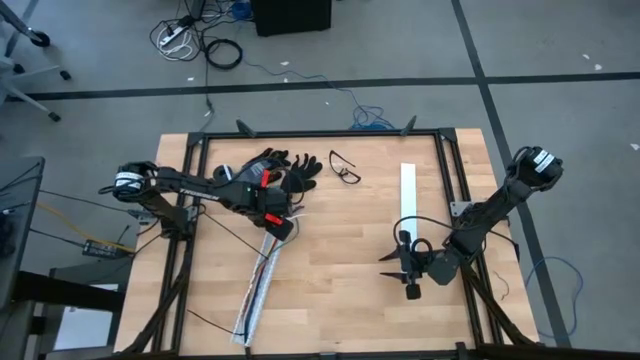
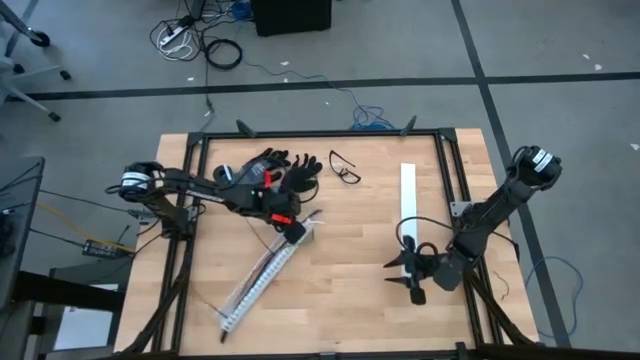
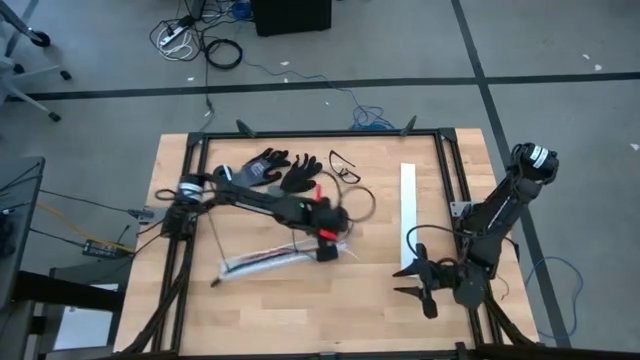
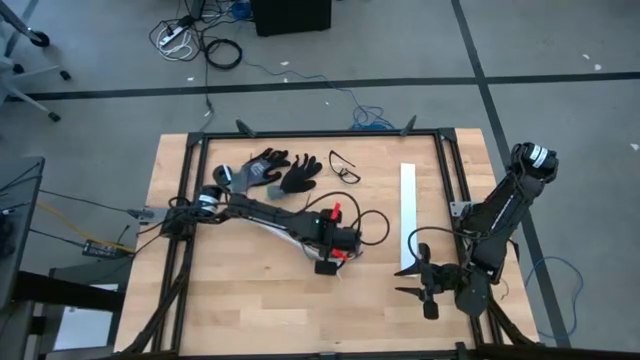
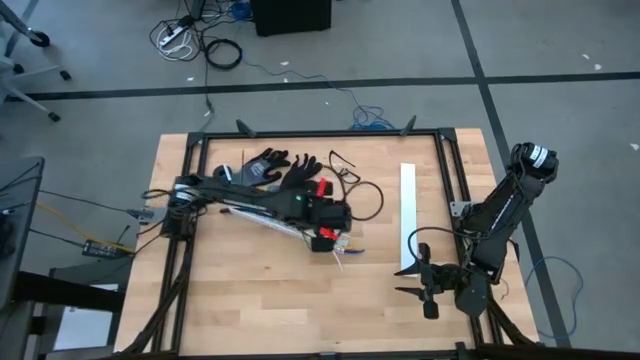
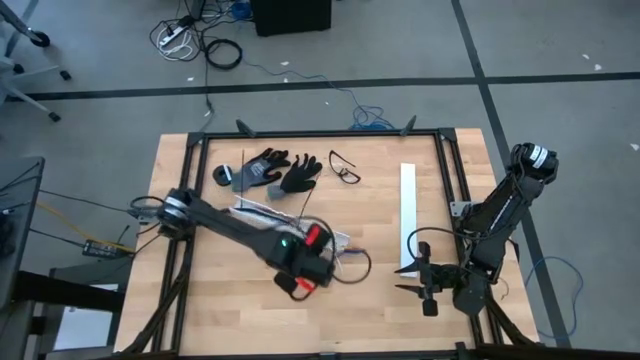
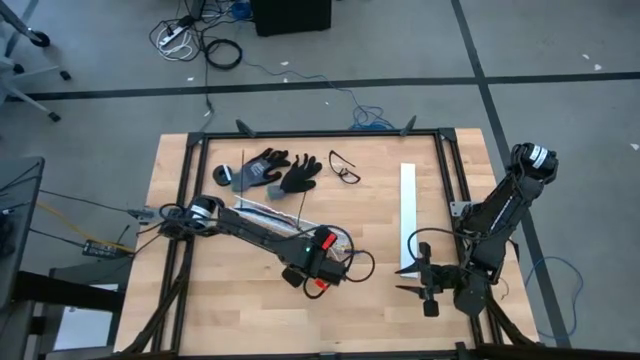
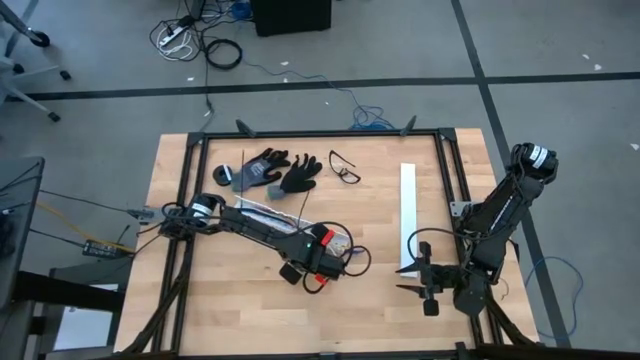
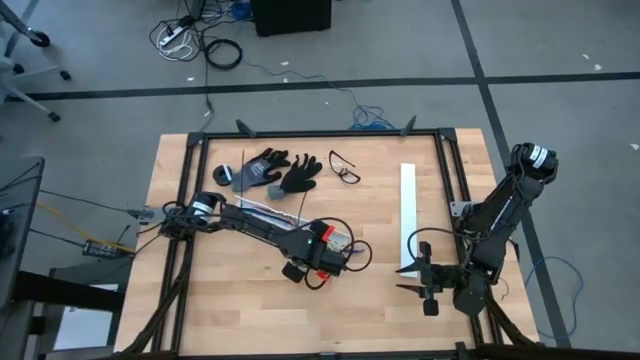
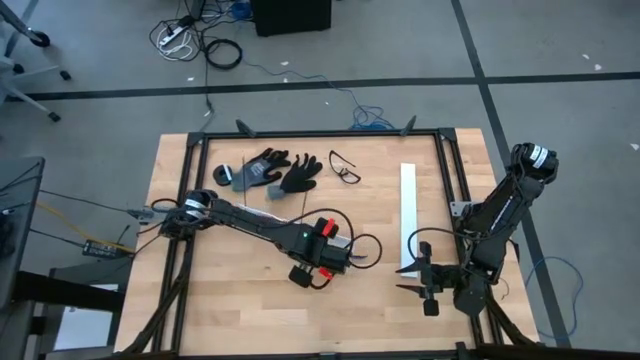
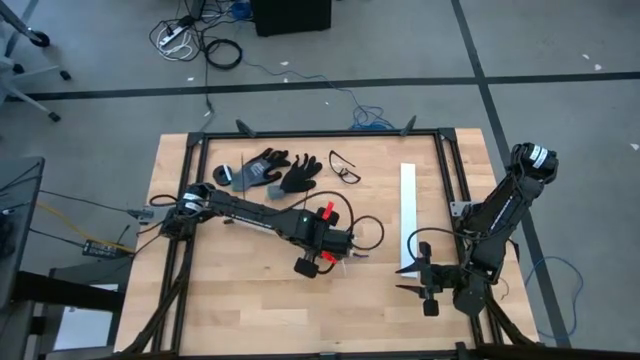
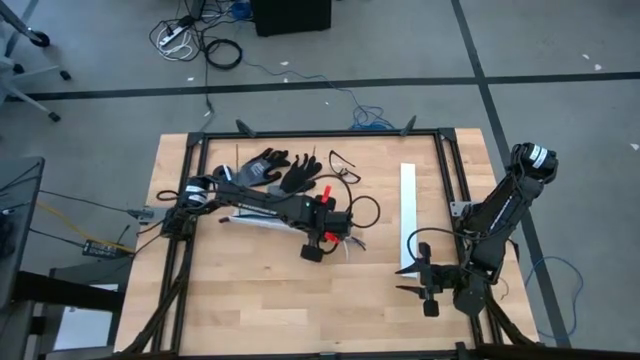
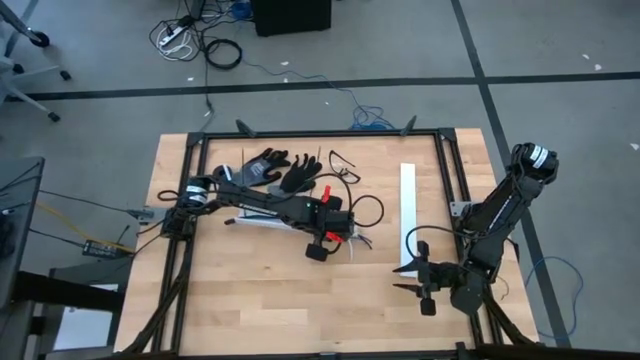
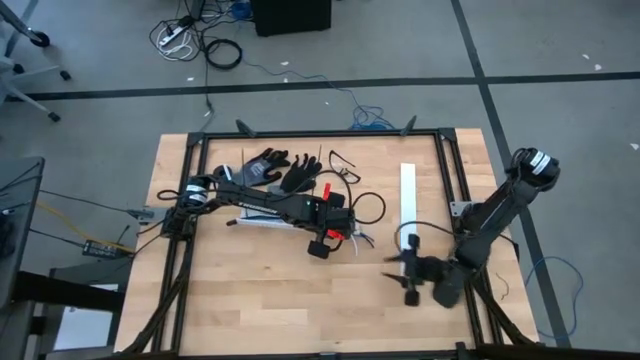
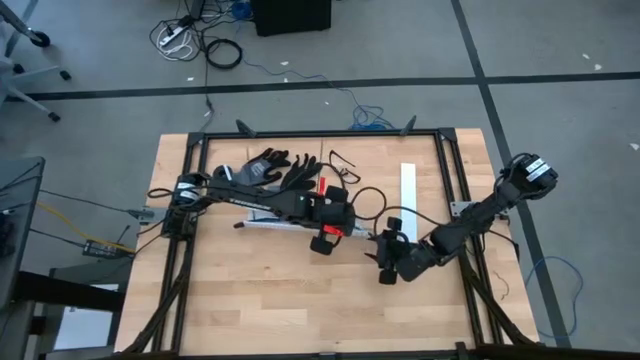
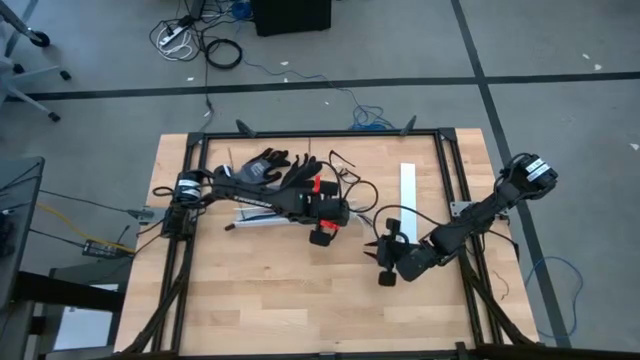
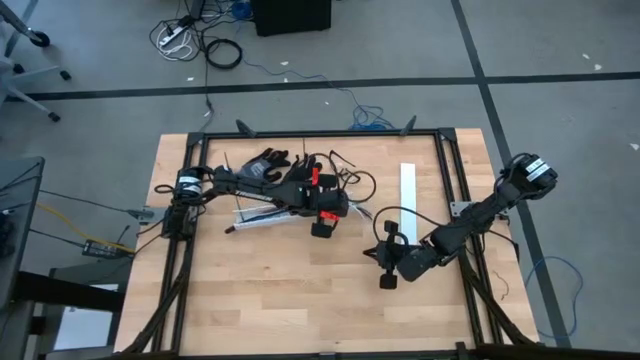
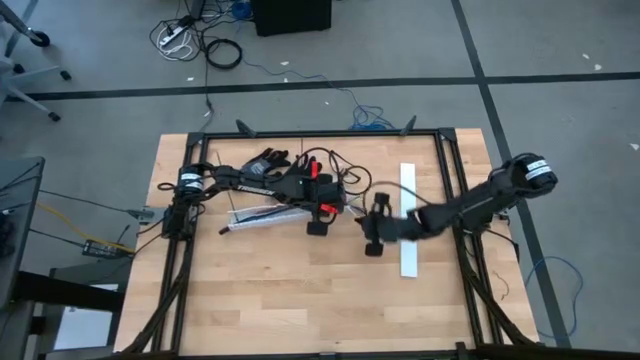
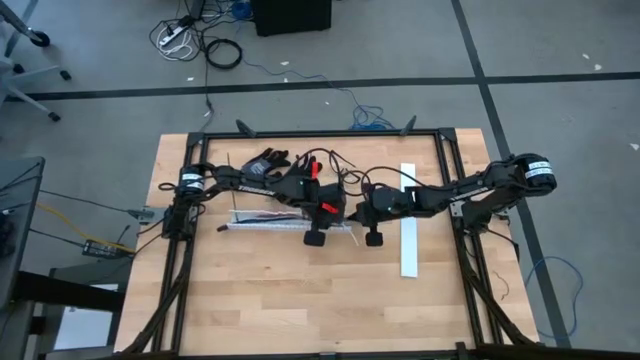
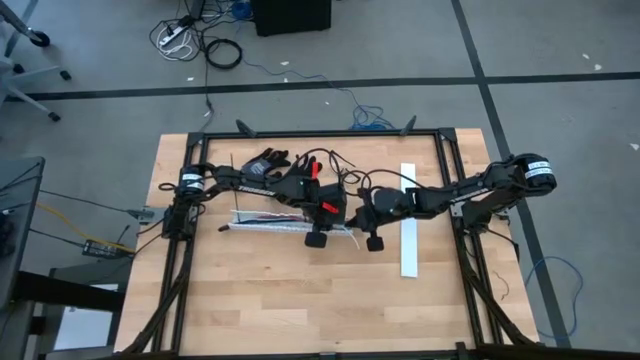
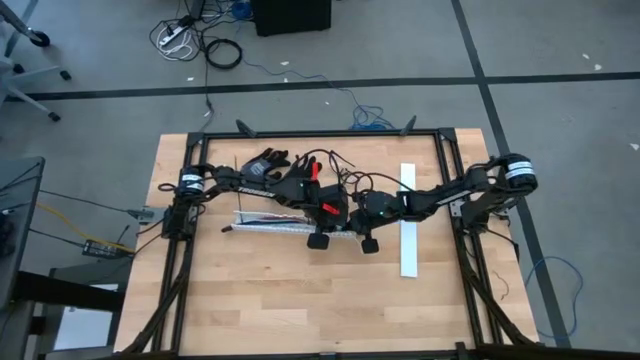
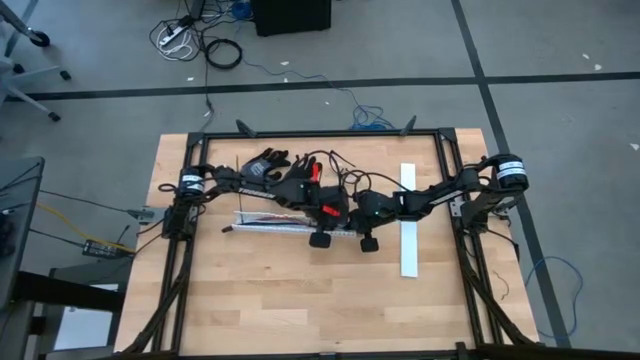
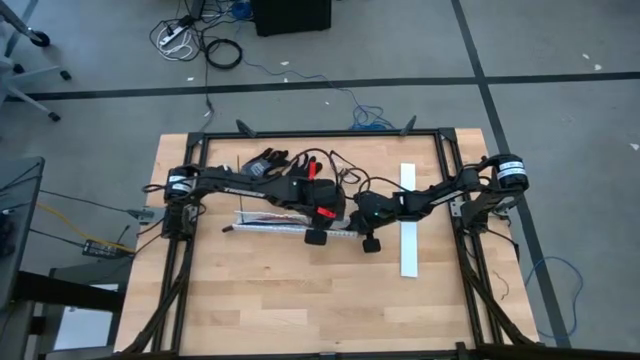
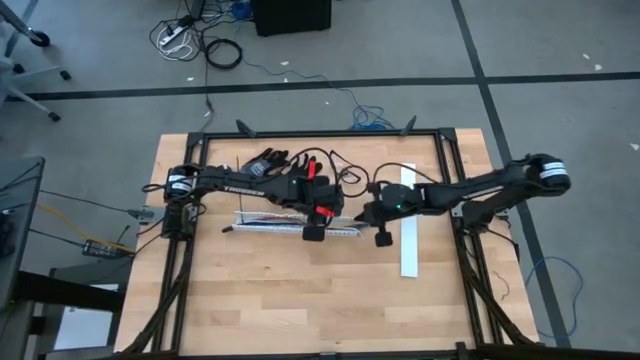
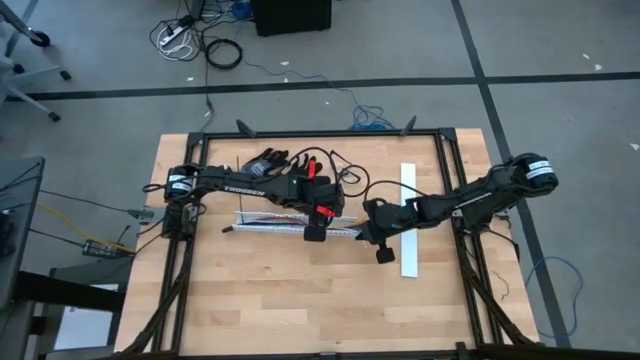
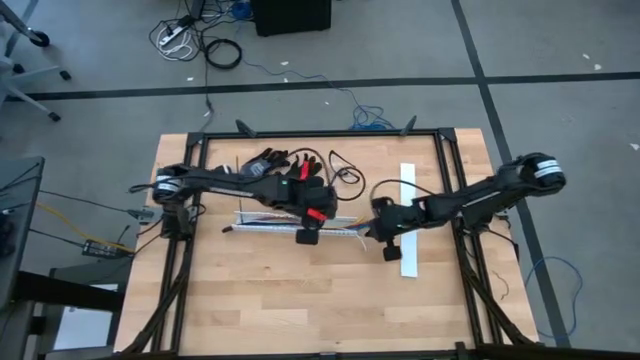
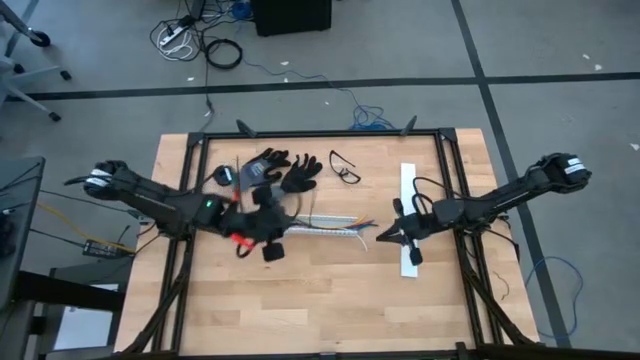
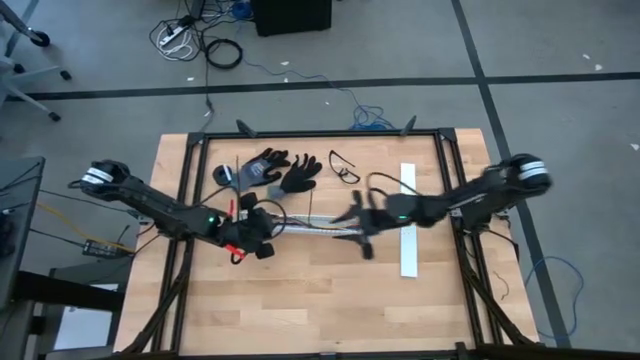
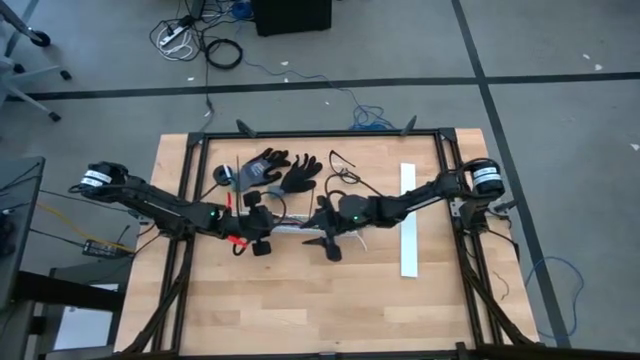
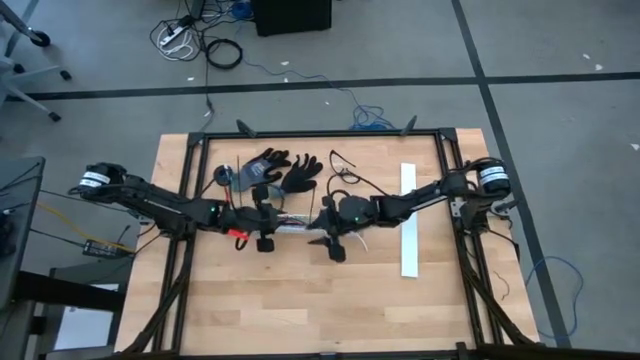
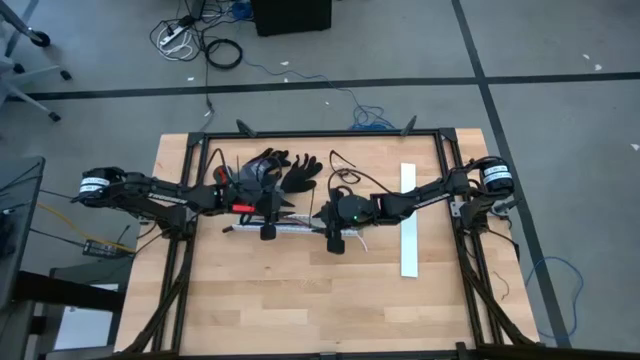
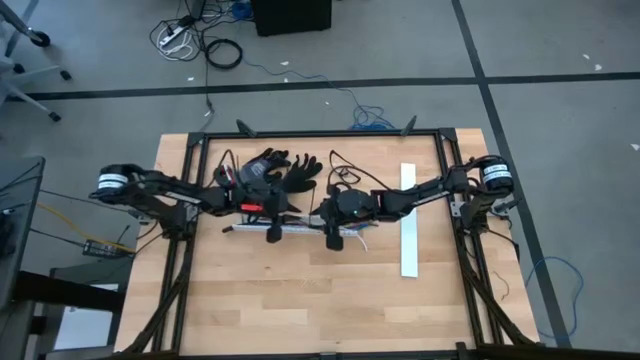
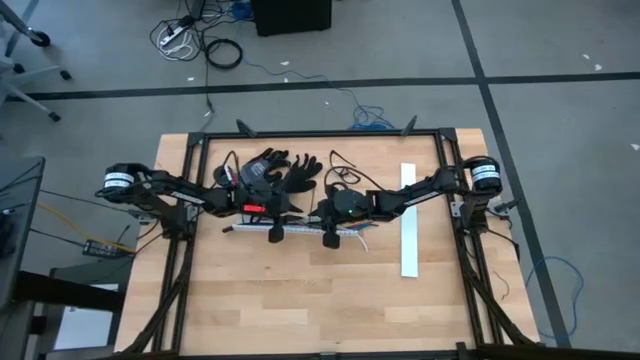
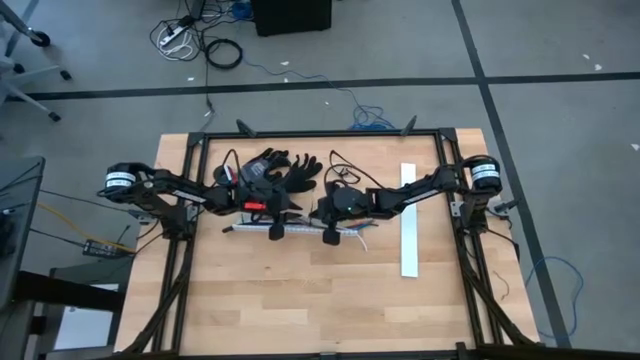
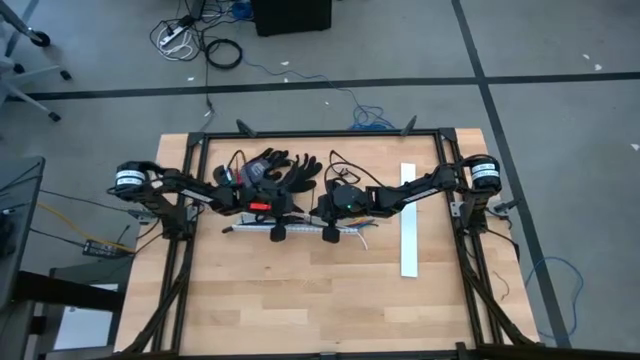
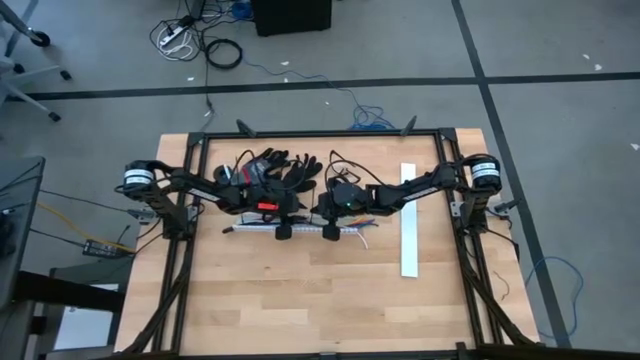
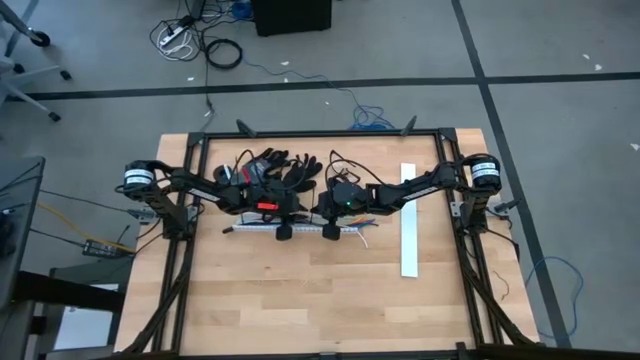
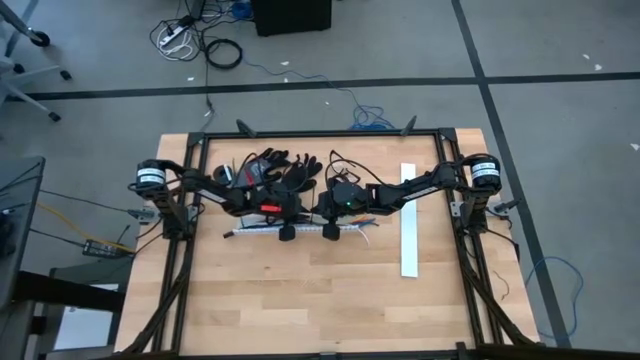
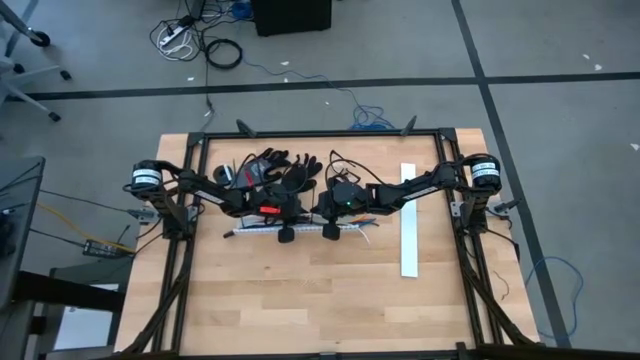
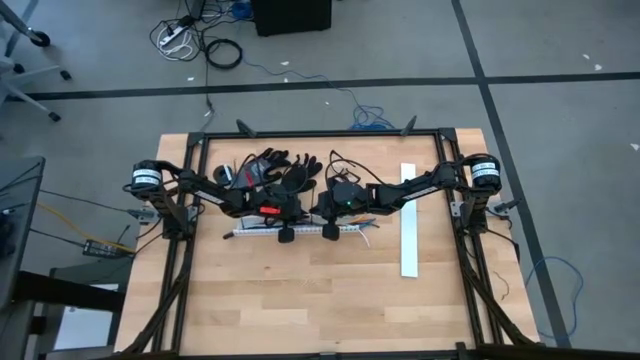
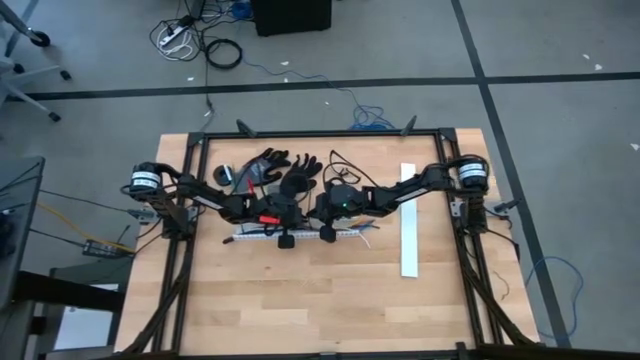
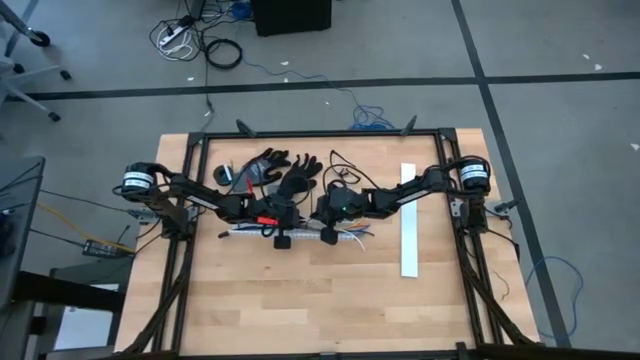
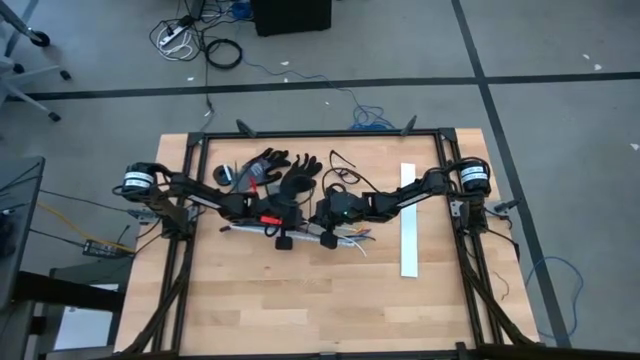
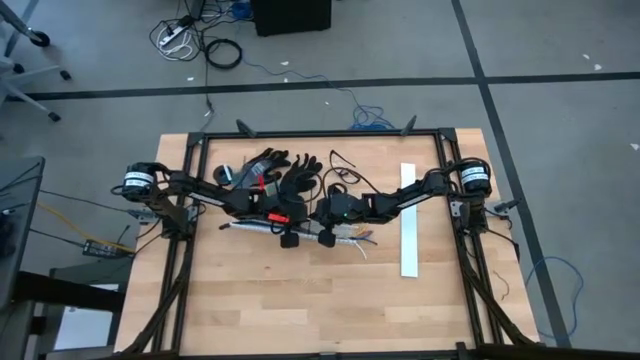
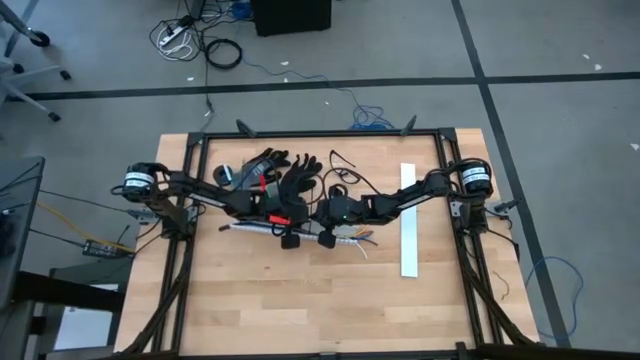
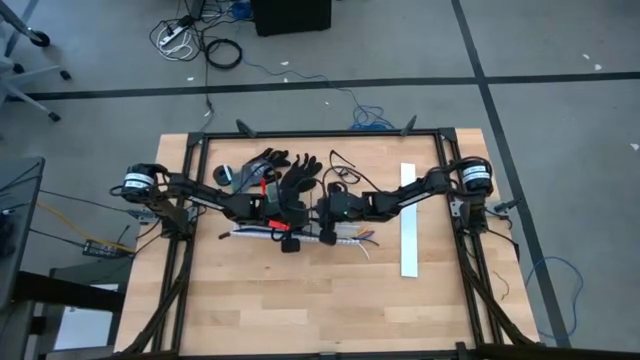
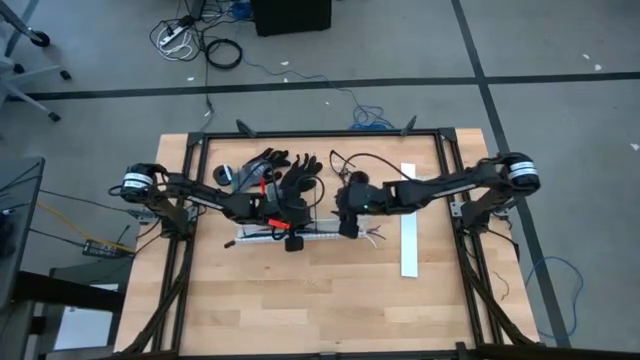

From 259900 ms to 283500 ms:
Task: Ziptie cables
Put the ziptied cables in a white cable duct
